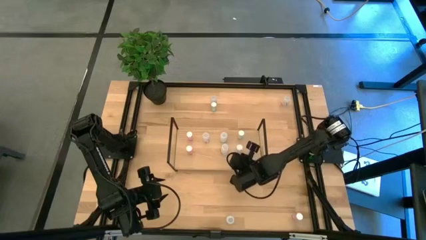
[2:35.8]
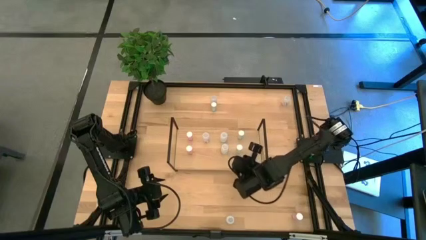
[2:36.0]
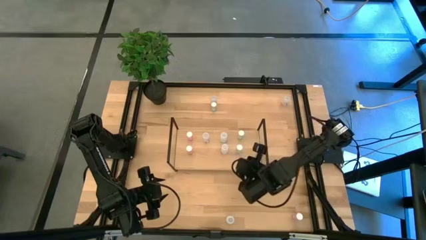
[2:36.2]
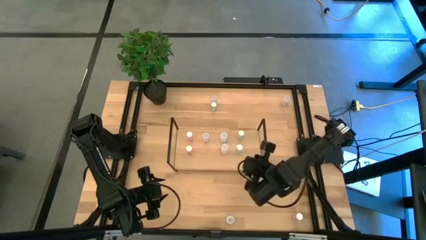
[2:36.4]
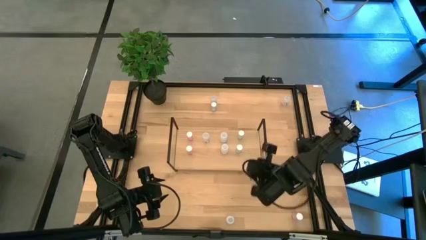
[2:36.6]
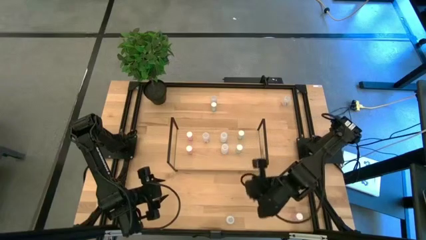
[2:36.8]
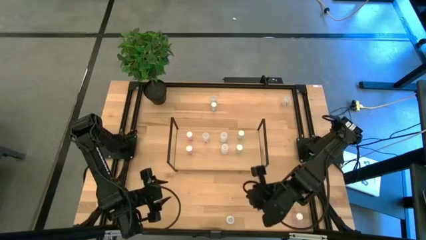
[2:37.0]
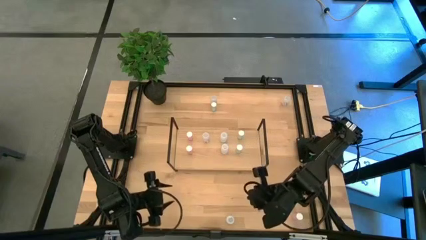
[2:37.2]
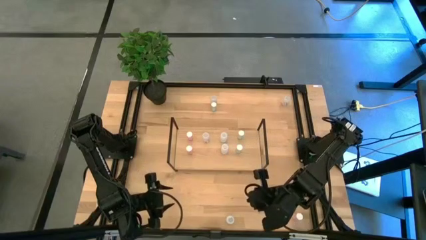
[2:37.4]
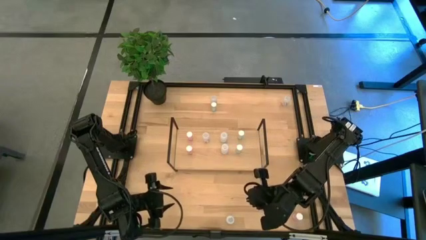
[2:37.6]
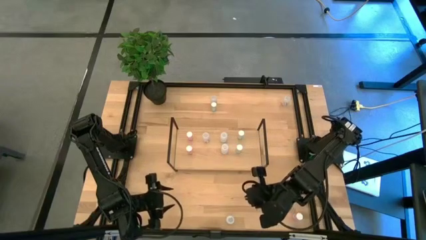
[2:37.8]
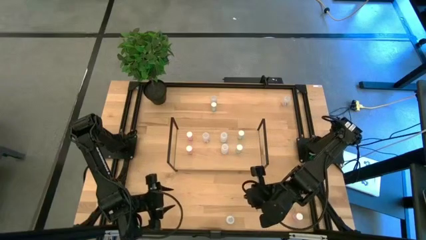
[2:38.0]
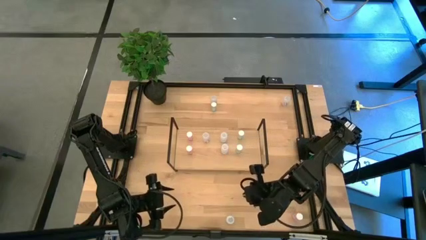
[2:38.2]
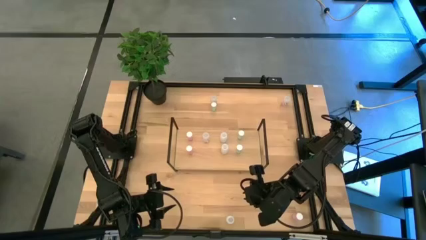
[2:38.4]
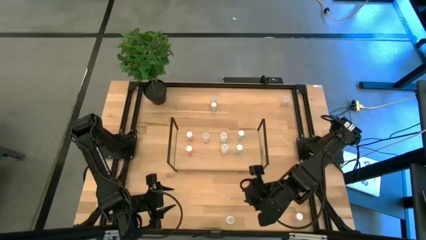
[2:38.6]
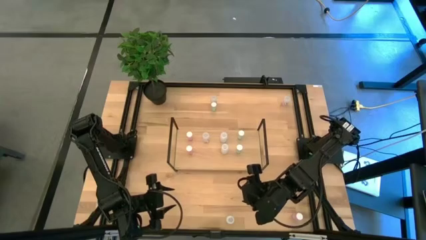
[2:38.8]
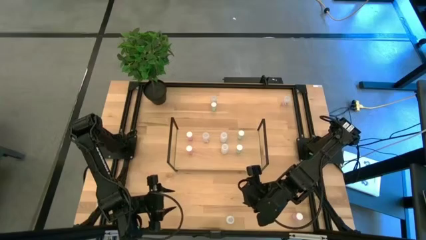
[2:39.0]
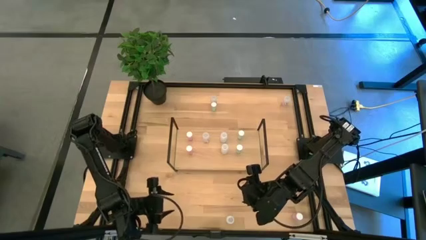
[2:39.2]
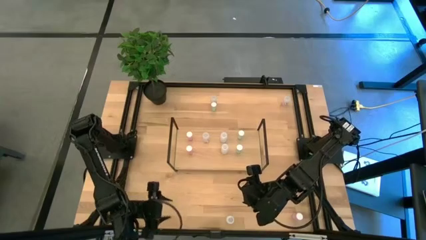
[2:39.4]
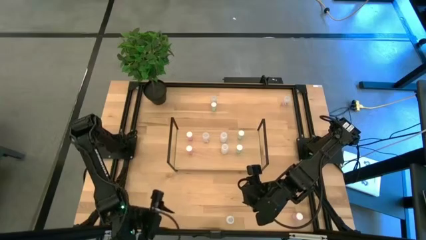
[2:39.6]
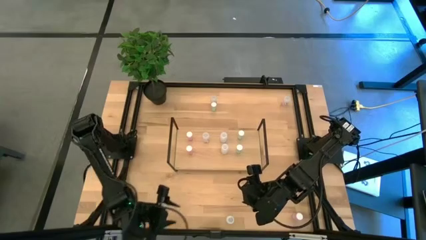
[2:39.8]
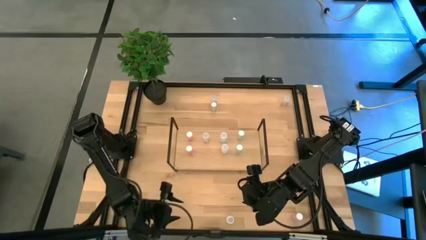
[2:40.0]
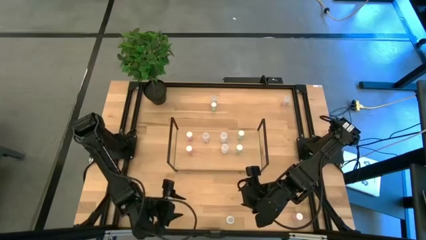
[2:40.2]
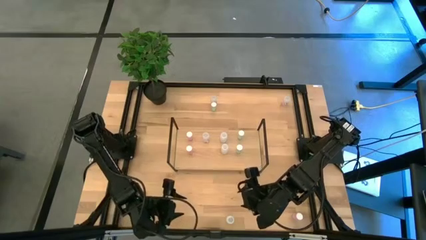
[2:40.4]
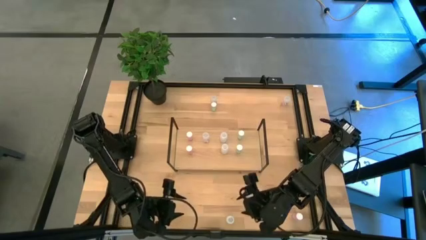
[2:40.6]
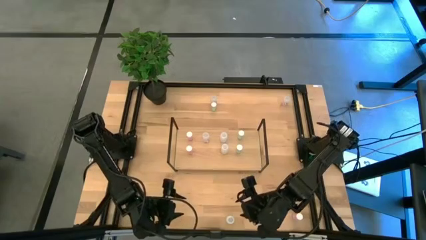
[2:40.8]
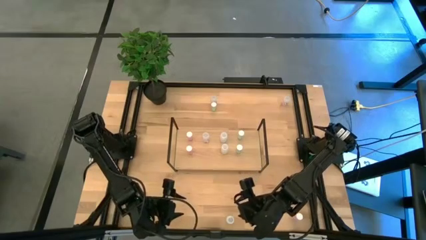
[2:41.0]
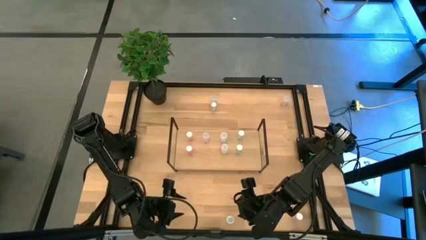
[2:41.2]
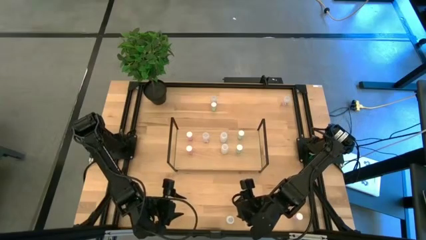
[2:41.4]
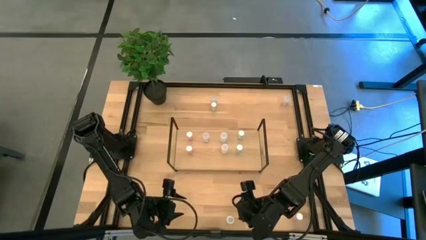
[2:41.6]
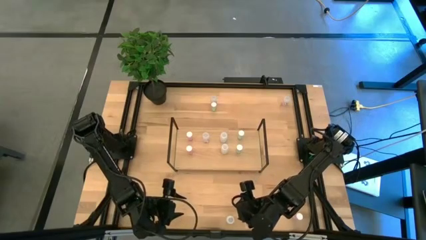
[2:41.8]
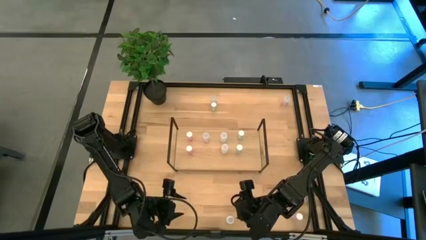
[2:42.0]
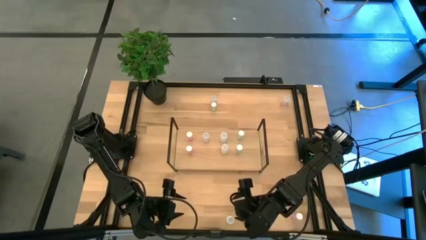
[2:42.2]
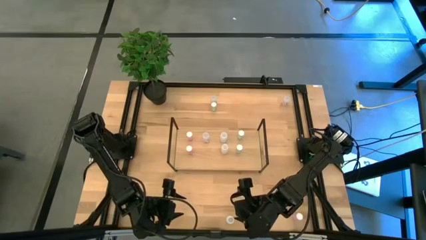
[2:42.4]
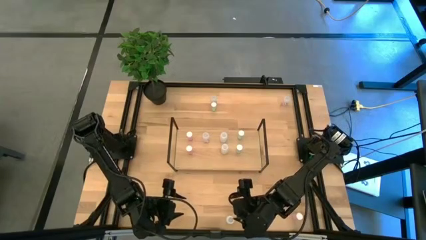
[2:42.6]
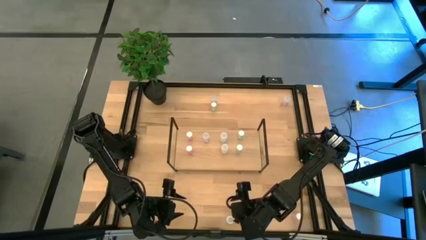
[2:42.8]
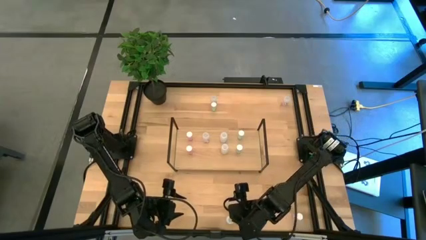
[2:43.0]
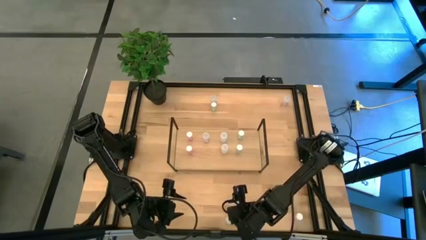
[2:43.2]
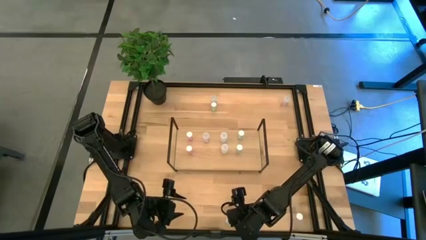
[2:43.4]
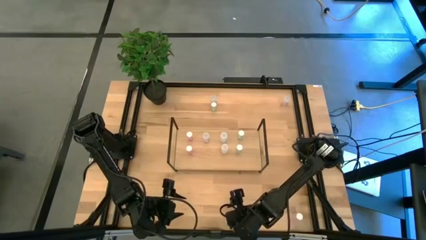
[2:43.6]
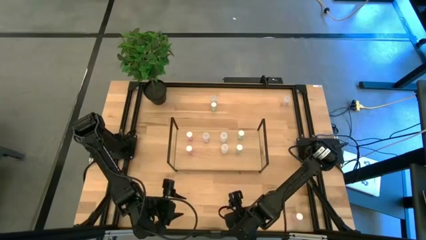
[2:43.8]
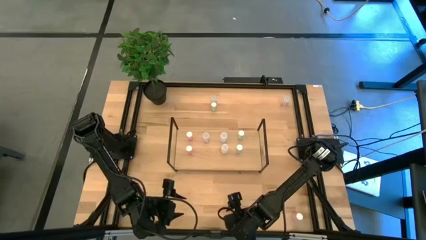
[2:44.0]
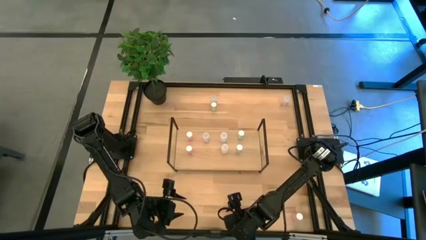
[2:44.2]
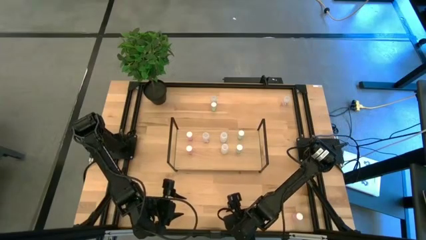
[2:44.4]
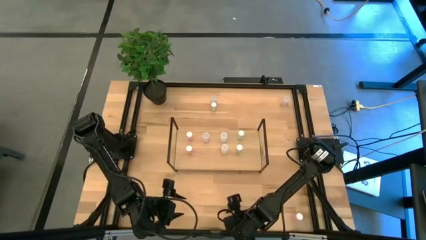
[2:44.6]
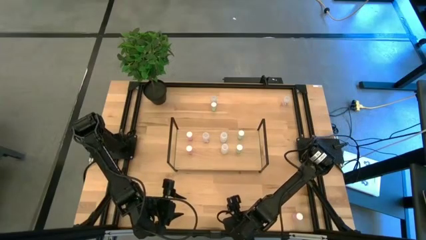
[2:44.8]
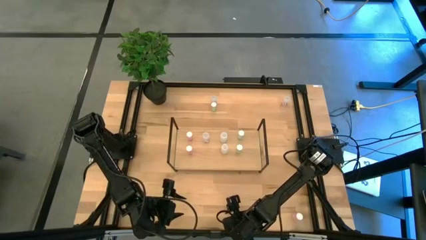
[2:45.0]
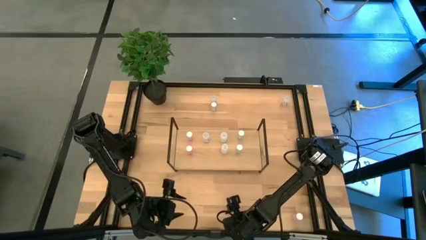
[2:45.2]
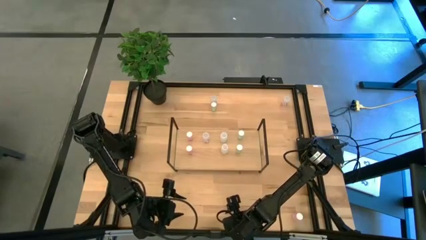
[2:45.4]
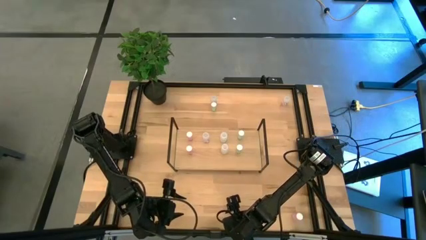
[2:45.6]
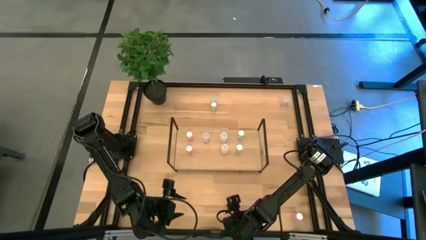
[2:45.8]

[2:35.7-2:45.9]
Task: Pick and place medicine bottles onto shelf by color
Put the white pill bottle on the shelf aligned with the other white pill bottles

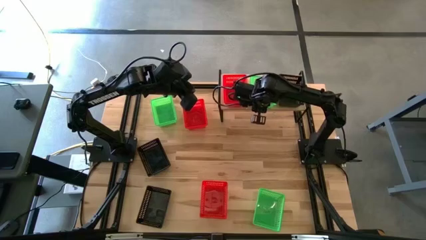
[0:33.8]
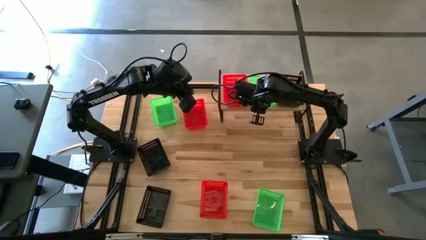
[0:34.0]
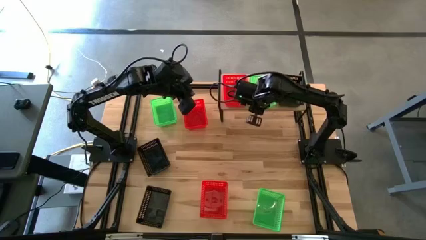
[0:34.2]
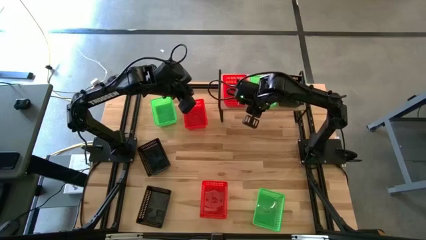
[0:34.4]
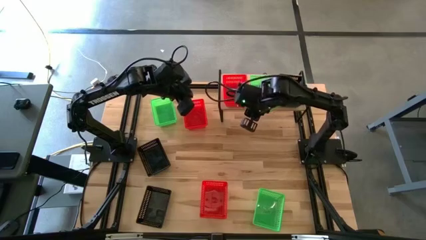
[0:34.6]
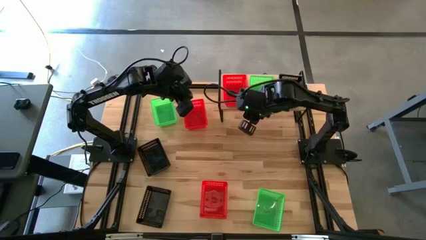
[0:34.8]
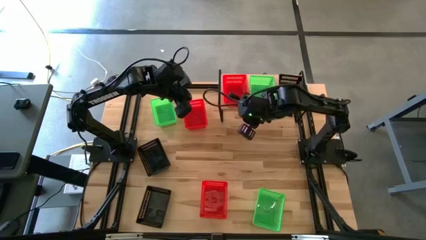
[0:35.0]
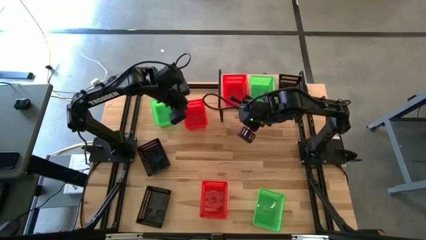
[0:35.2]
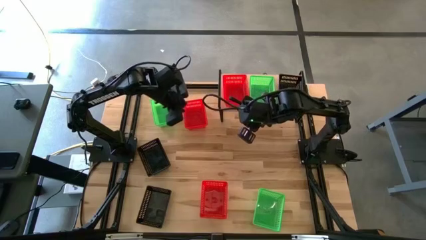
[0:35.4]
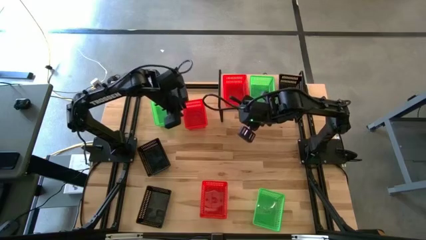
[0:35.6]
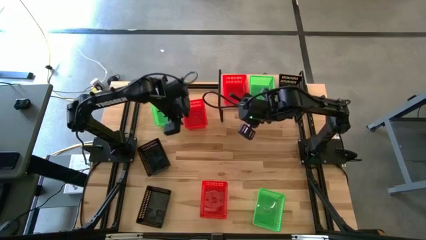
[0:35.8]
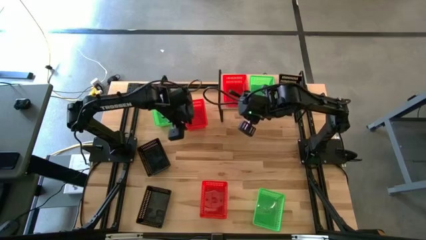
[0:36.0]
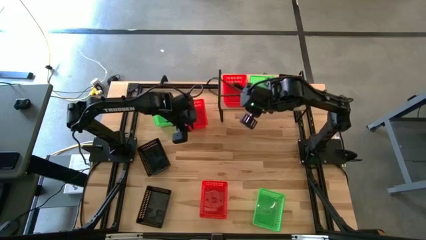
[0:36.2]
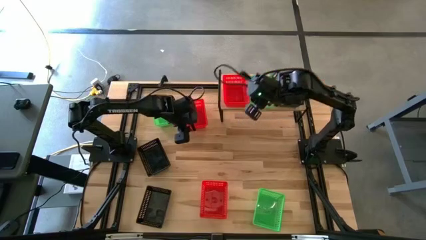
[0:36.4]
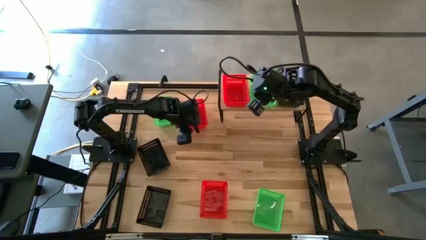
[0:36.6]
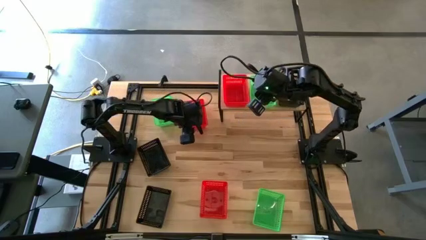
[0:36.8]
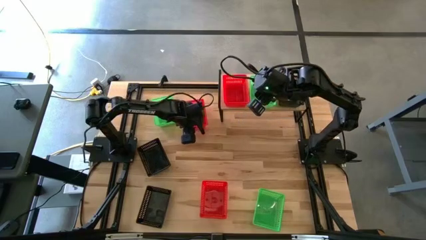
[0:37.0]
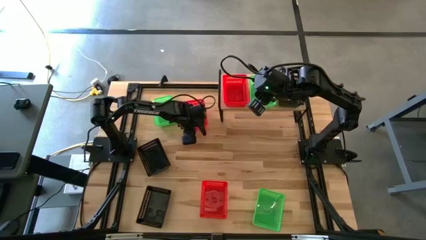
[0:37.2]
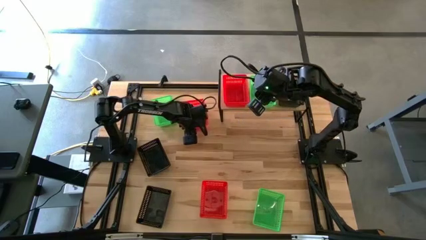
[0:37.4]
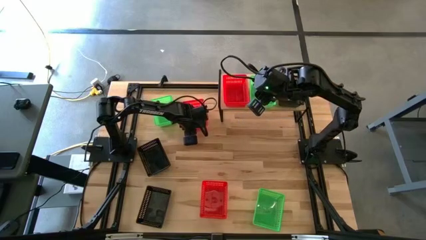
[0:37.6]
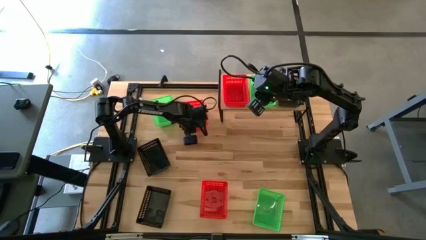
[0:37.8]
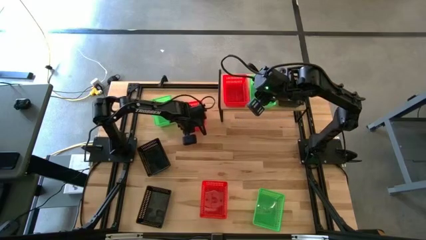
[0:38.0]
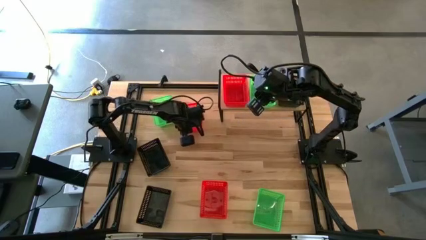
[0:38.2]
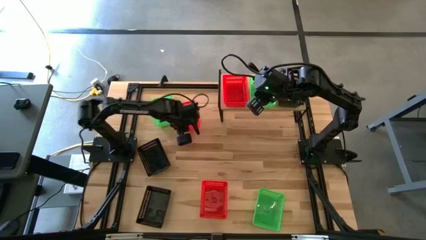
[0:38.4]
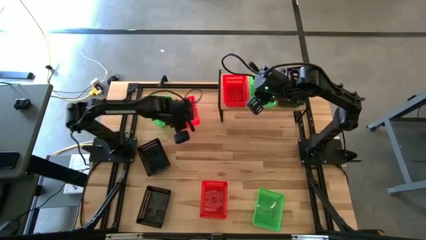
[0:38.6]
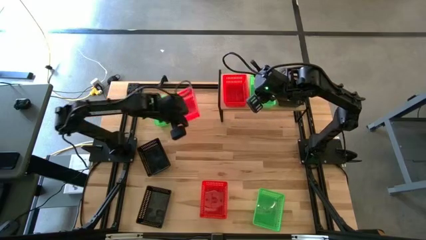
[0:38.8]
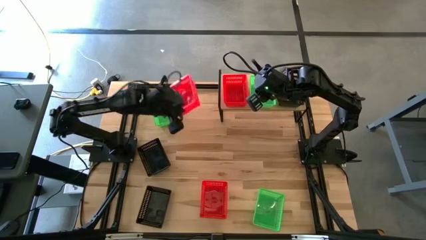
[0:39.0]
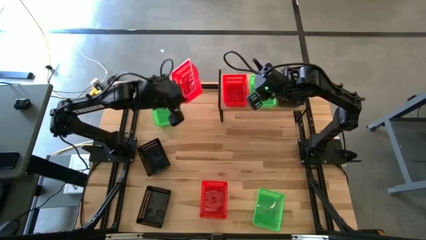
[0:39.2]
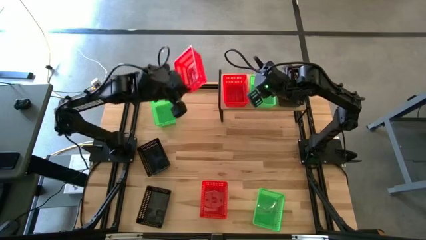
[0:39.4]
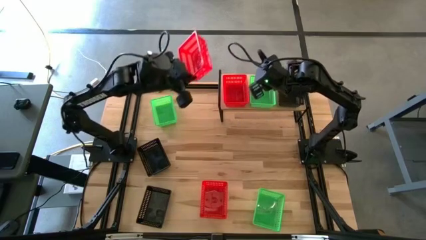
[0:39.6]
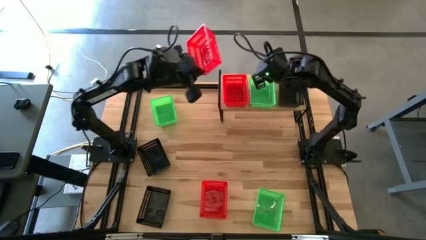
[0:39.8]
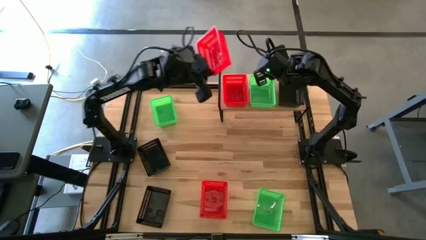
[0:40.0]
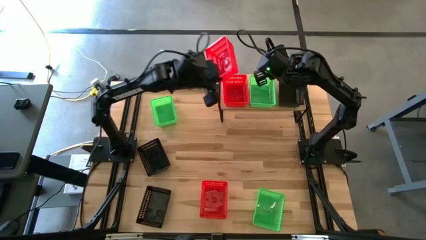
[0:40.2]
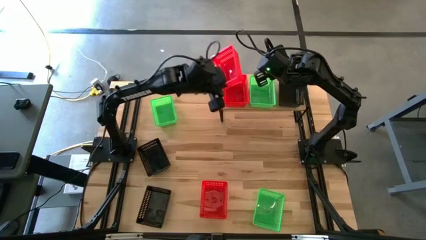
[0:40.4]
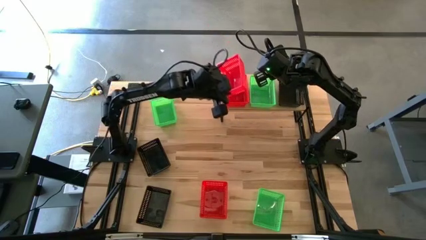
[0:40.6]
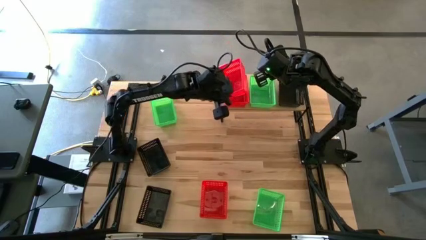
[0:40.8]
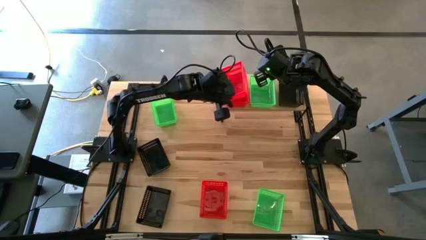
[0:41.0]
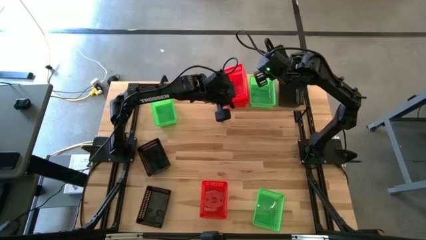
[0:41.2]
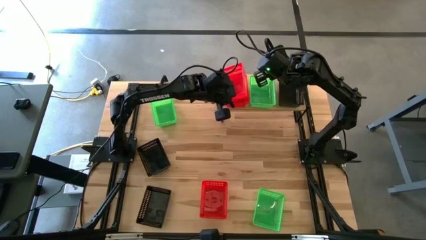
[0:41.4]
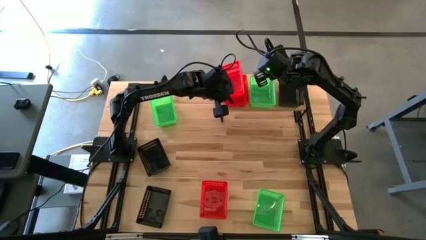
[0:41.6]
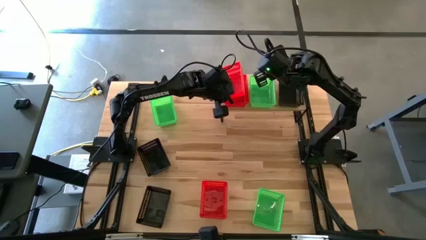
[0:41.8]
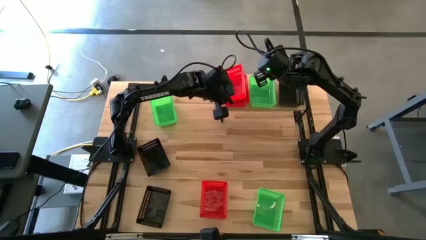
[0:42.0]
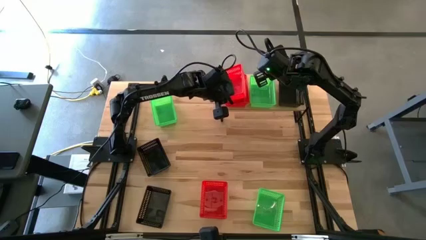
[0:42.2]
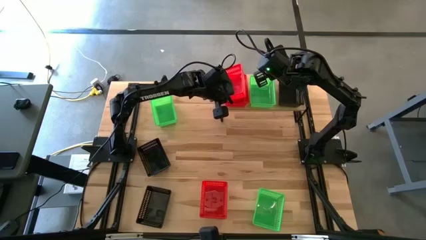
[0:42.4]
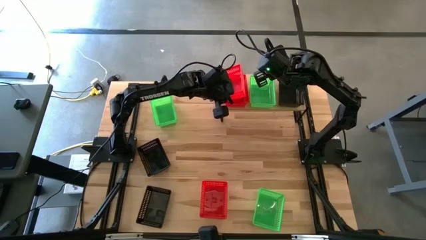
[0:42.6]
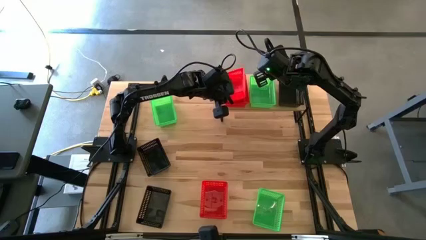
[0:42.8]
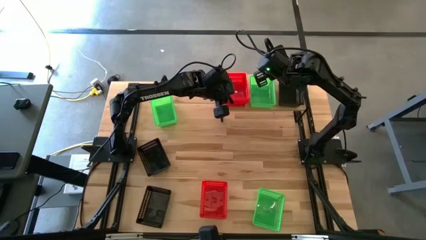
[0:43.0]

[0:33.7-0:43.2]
Task: Stack baskets on shelf by color
Stack the top red bin on top of the red bin
